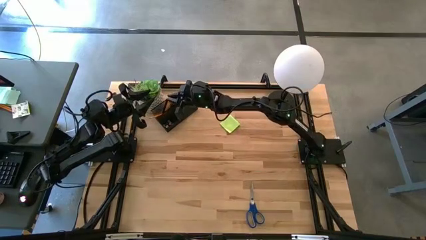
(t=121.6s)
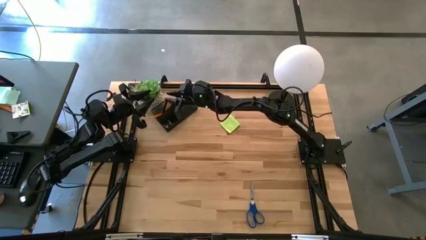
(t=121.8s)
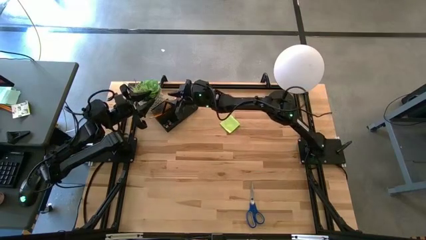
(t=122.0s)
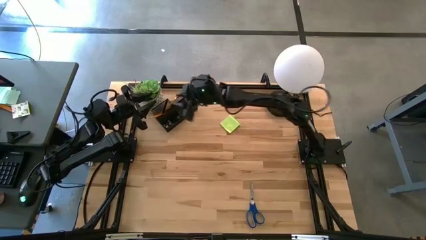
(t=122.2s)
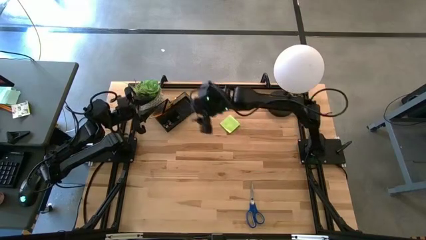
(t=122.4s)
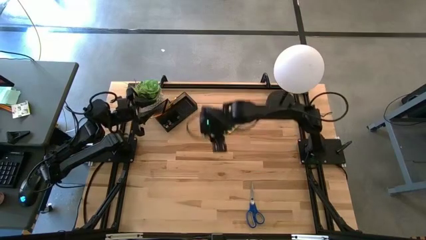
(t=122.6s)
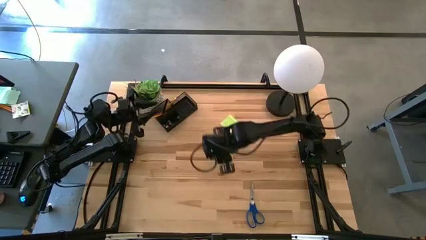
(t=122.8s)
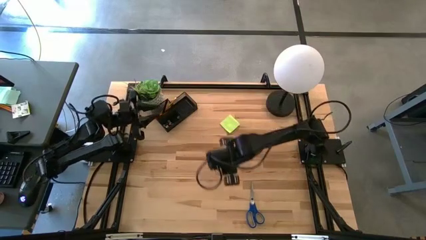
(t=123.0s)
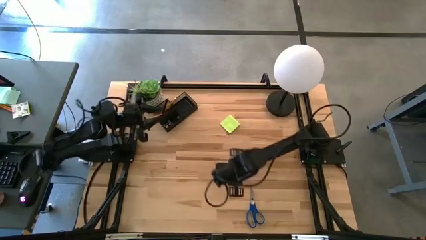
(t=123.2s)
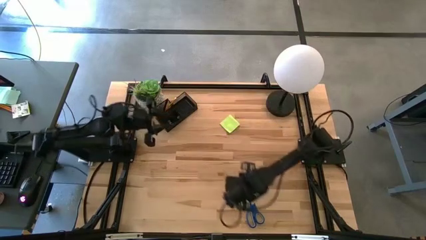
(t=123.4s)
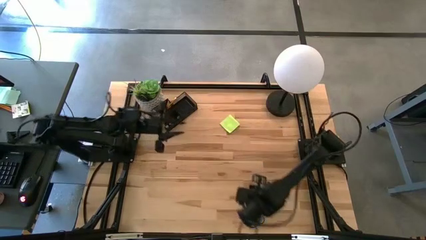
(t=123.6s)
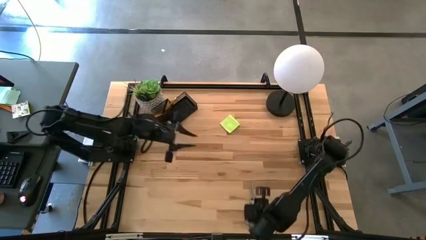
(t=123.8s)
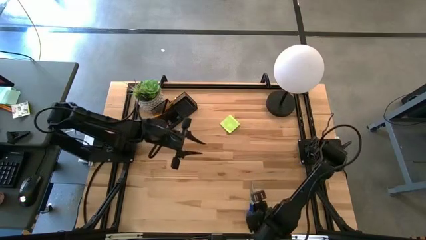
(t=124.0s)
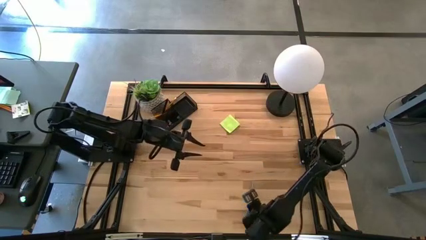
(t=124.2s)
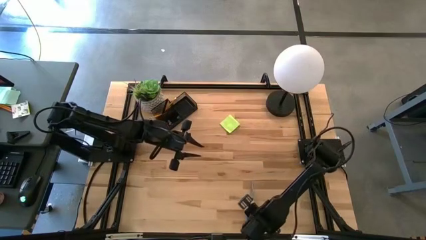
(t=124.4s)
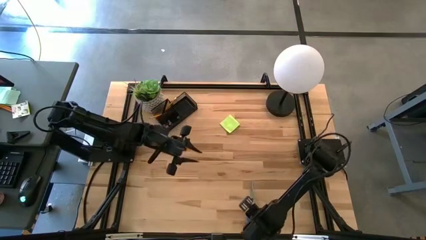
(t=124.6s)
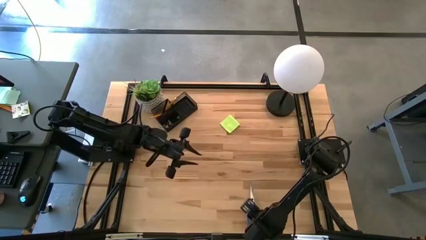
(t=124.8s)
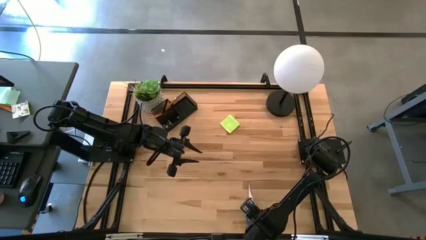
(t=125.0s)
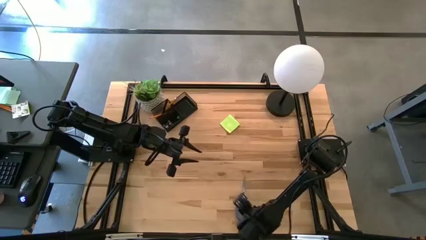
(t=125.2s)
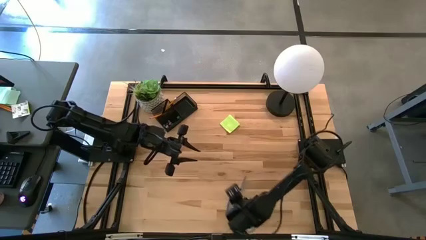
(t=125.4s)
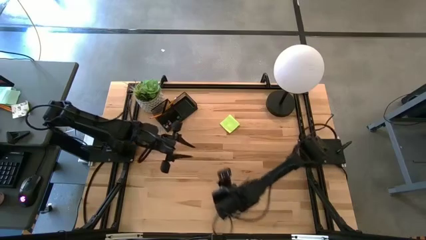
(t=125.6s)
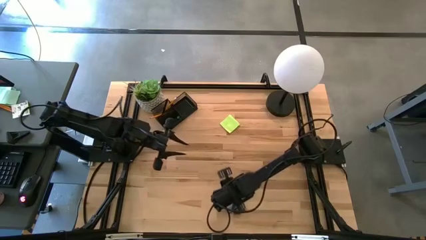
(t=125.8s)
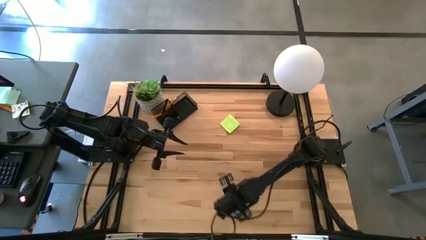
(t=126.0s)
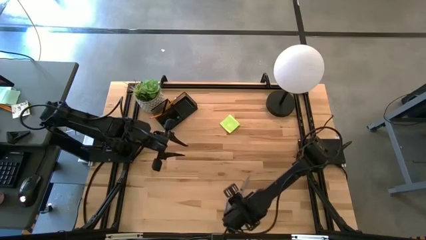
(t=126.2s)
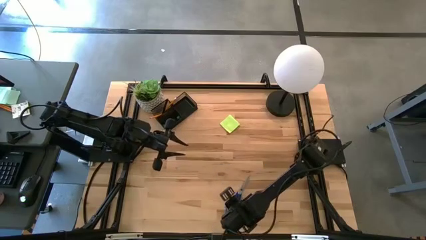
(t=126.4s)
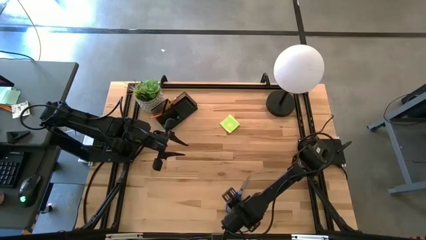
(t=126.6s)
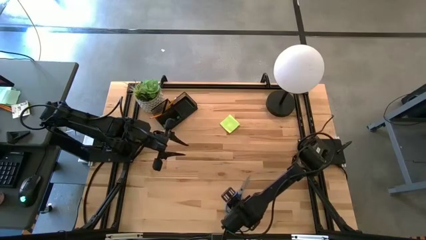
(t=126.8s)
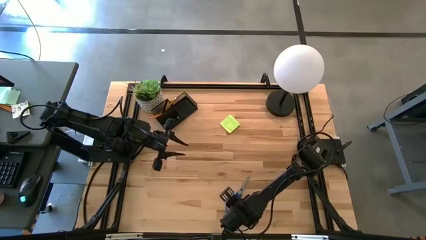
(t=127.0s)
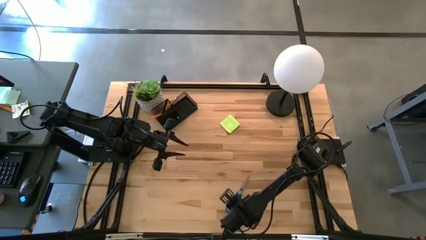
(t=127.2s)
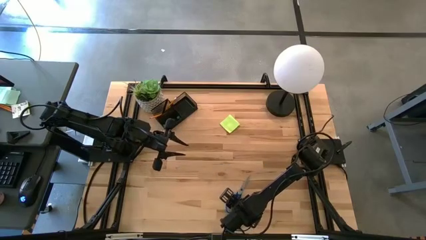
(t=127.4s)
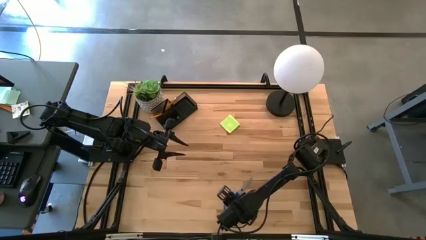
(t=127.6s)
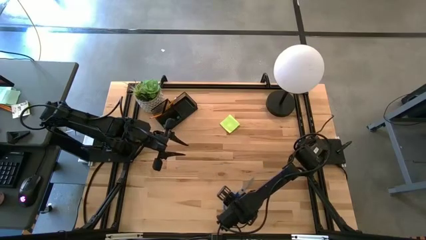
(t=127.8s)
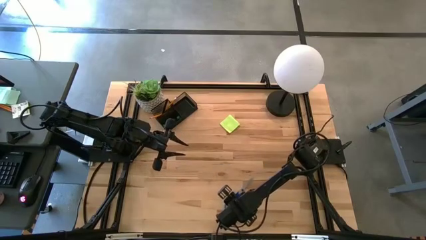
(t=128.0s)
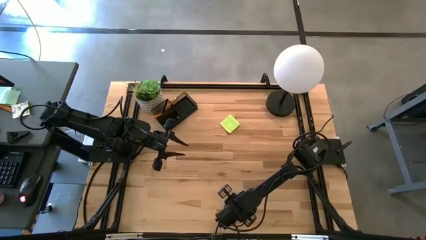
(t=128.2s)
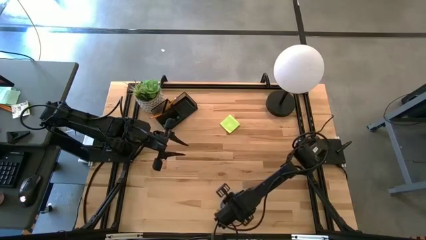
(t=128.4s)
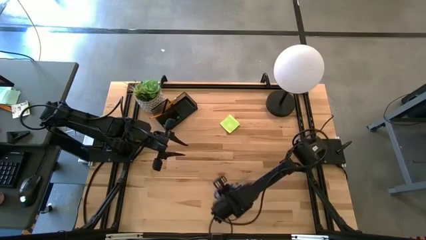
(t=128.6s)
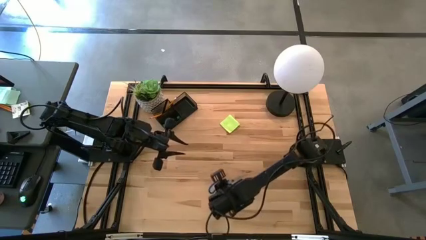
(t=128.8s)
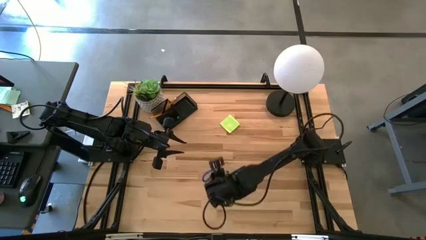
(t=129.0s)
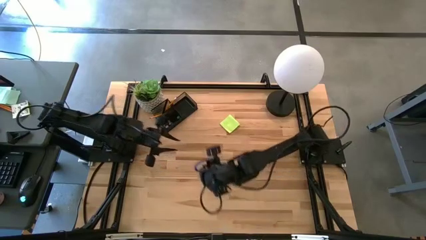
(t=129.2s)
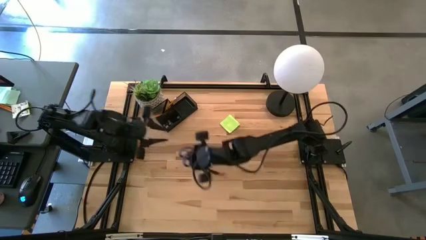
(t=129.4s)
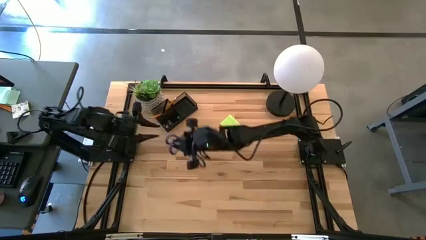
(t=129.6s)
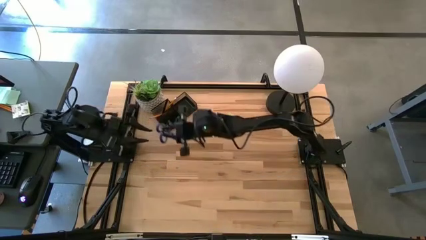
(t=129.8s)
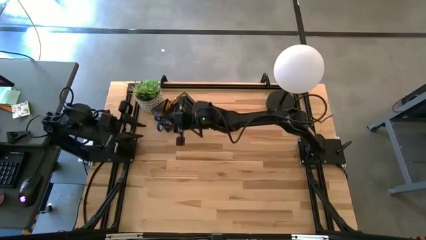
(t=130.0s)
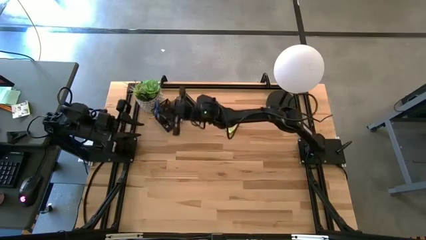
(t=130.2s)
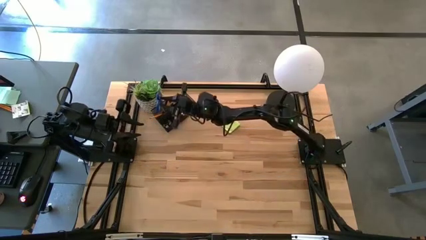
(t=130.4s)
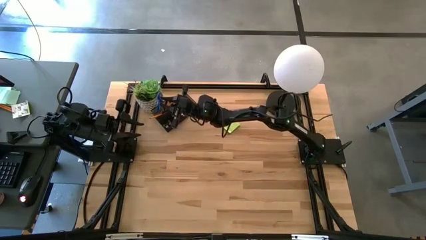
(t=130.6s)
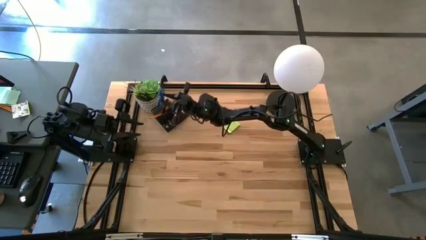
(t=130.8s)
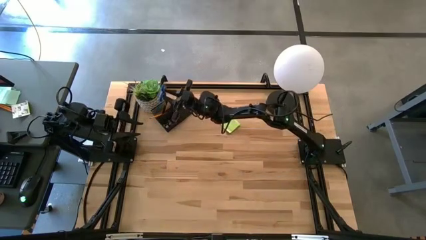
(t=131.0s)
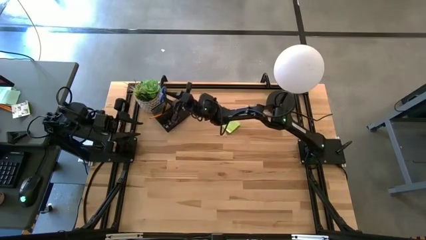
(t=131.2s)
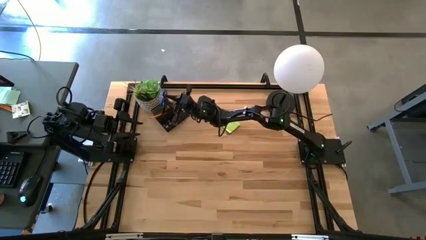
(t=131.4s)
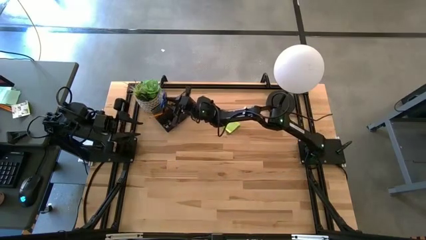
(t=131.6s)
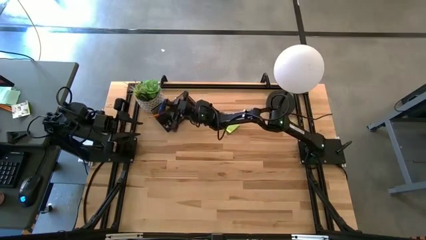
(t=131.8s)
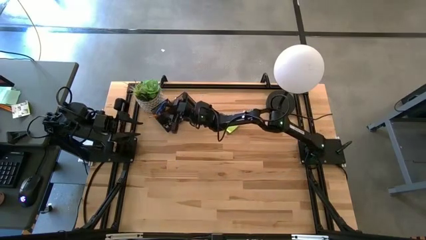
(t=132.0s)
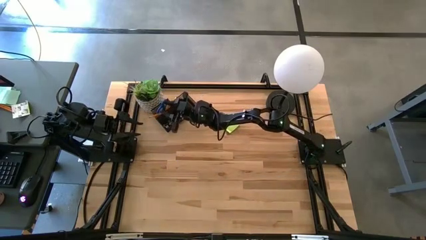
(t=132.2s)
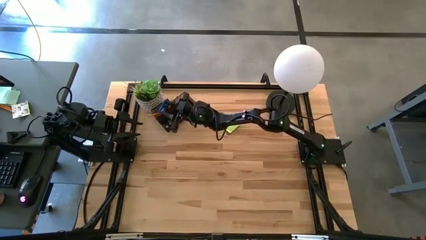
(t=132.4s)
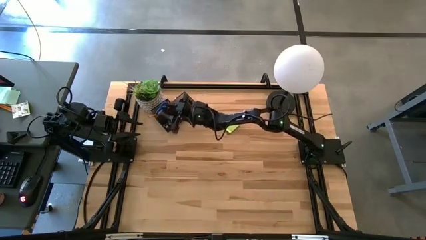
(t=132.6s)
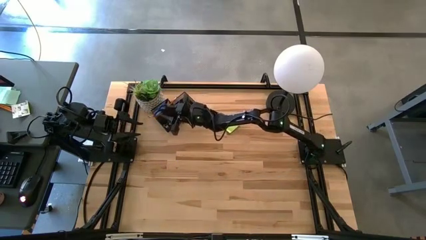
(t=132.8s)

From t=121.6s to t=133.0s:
Task: Pick and place office supplies into organizer
Put the blue scissors into the desk organizer

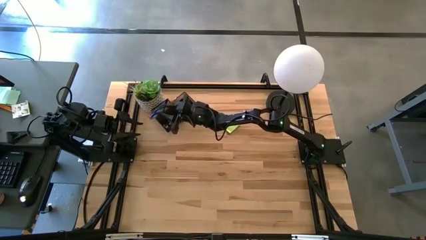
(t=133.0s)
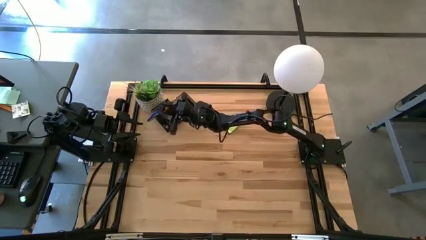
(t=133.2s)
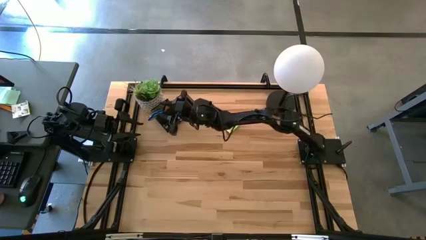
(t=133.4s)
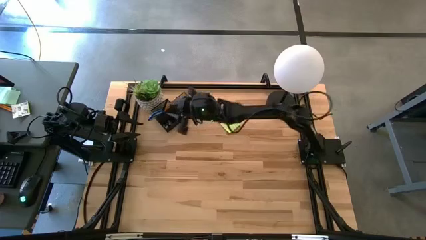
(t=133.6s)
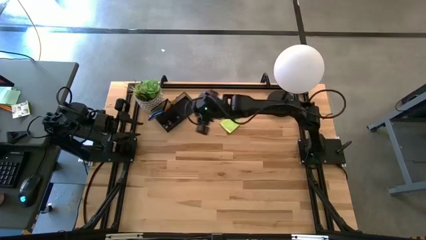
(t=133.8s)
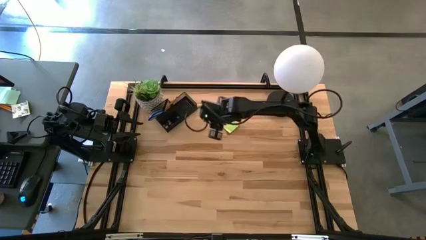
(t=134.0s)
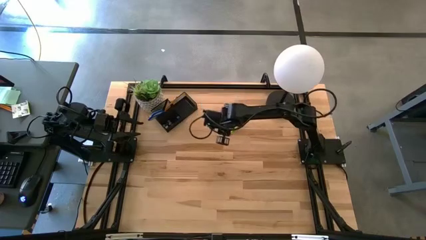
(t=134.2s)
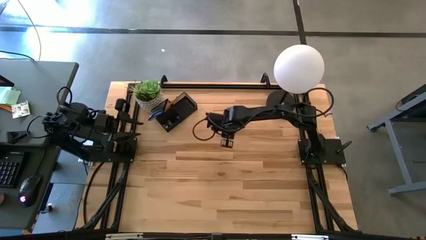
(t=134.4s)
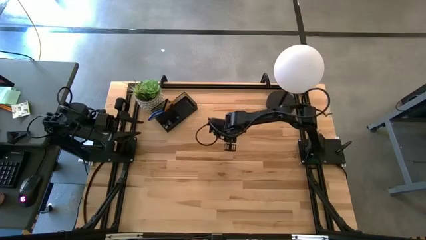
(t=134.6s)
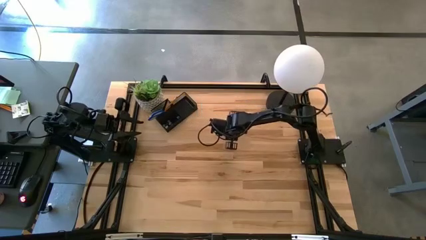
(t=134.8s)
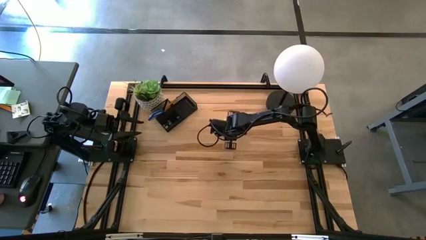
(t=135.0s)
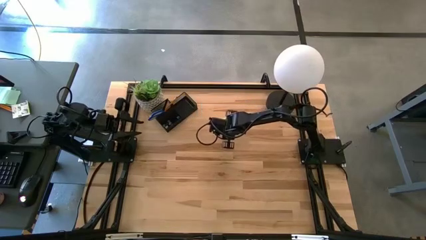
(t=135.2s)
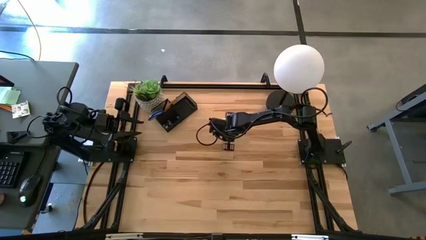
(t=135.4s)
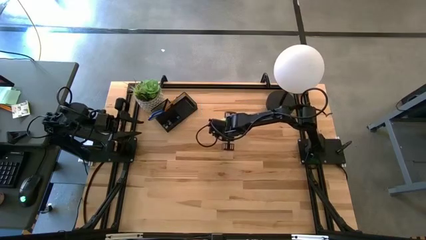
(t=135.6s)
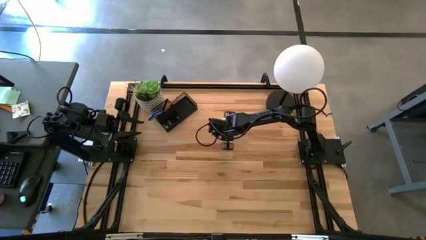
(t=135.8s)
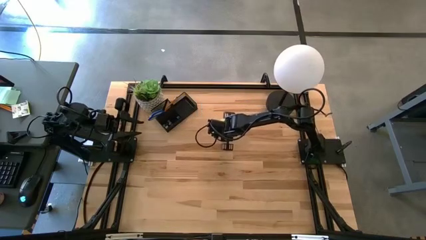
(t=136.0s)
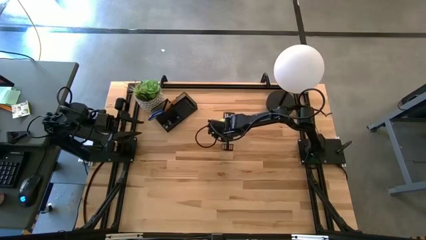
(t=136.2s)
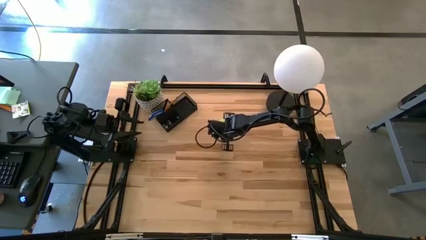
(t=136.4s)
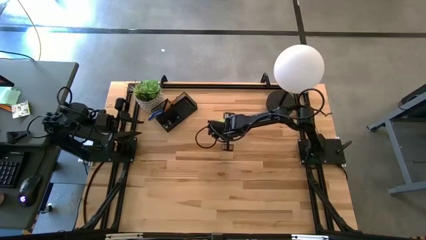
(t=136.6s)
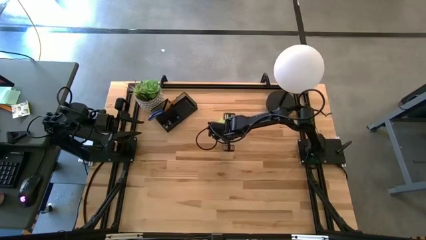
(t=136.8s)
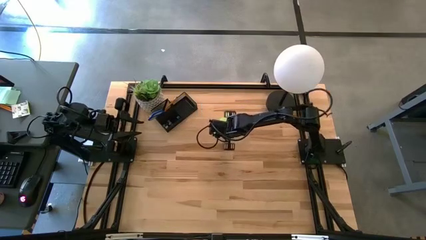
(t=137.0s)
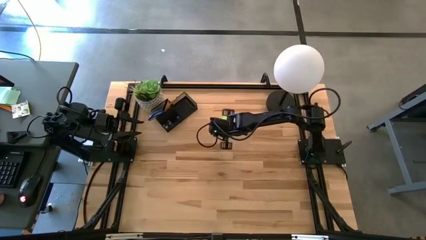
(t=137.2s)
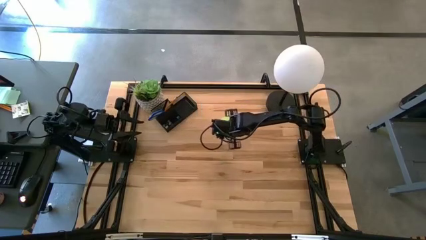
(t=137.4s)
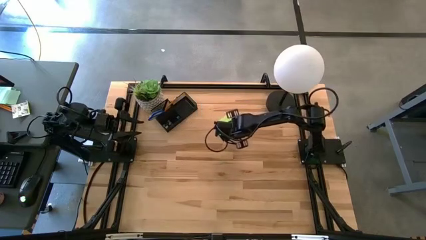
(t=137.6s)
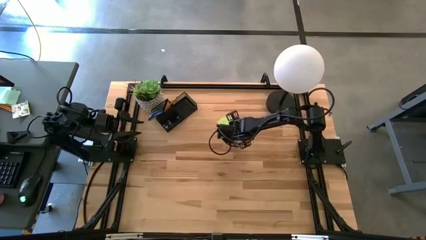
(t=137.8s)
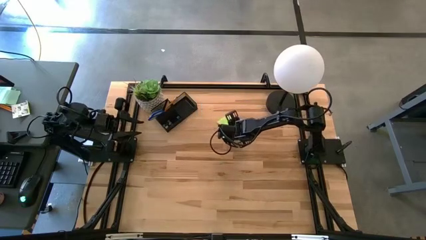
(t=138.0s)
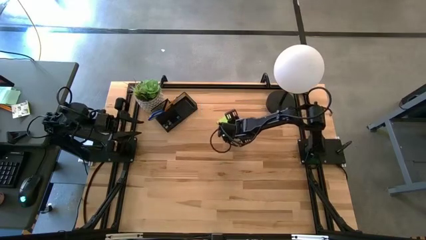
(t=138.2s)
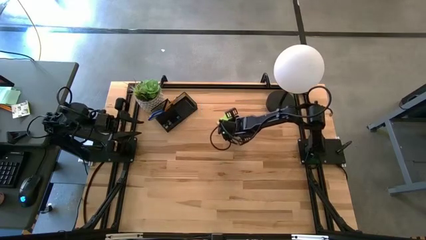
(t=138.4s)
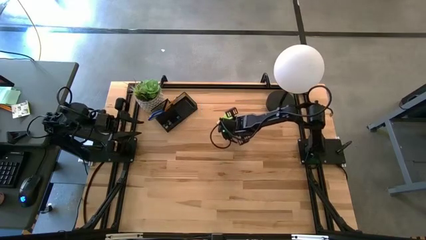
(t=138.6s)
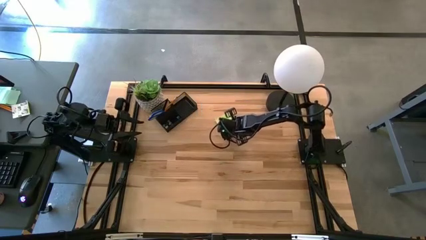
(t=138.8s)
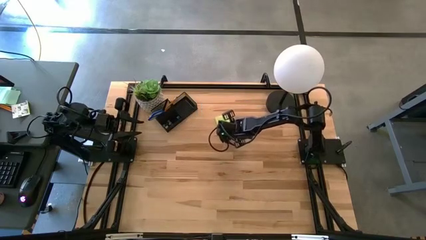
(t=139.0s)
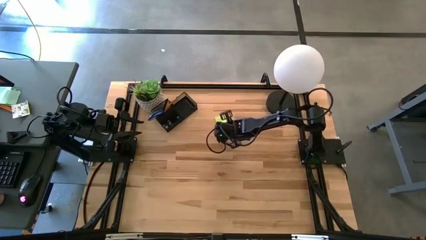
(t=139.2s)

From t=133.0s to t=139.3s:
Put the green sticky note into the desk organizer
